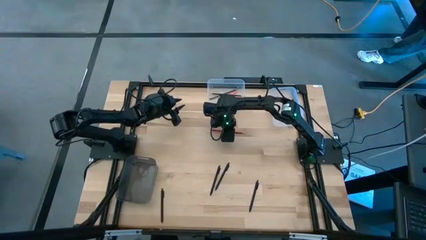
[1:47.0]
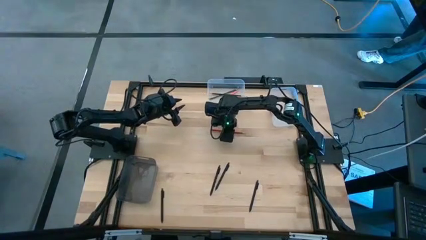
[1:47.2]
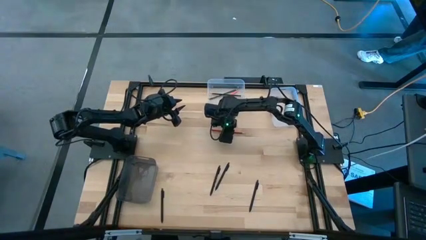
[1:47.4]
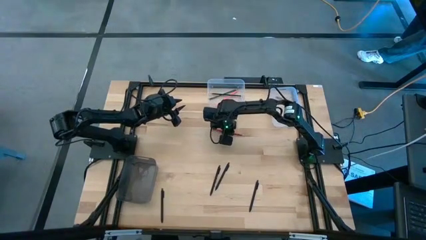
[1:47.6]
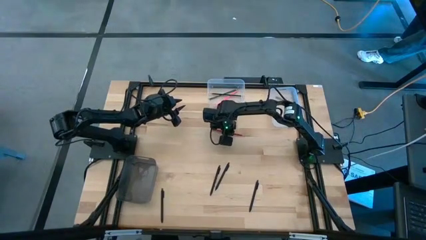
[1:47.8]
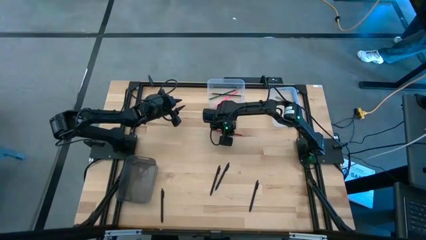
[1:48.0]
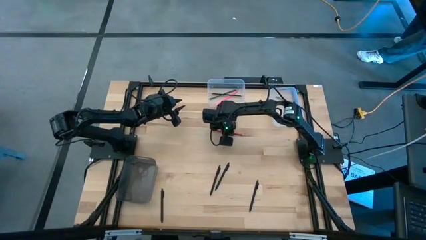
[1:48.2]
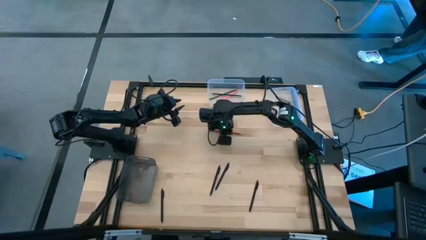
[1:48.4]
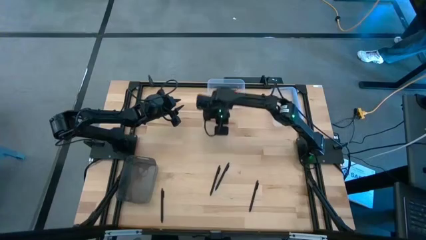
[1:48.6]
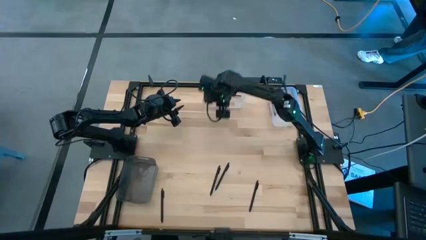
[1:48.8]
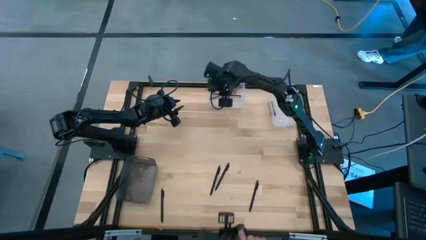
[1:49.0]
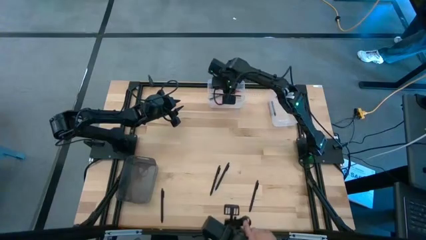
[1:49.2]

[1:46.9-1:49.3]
Task: Sort crayons/erasers/pens/pencils in bins
Put the red pencil into the left transparent bin

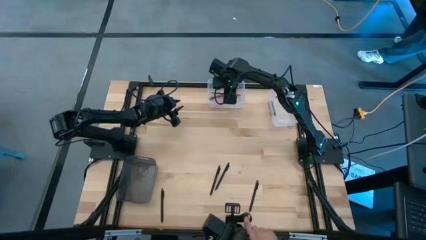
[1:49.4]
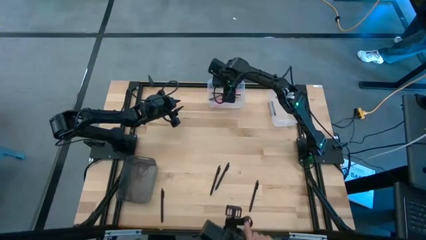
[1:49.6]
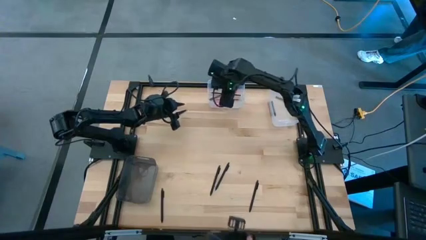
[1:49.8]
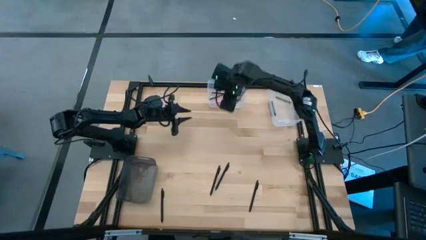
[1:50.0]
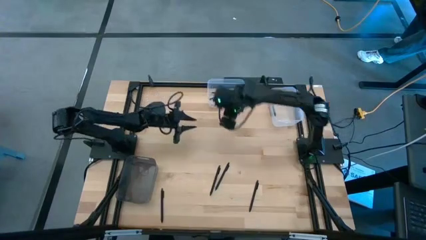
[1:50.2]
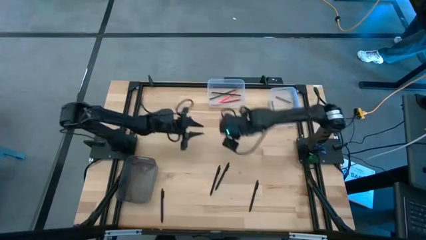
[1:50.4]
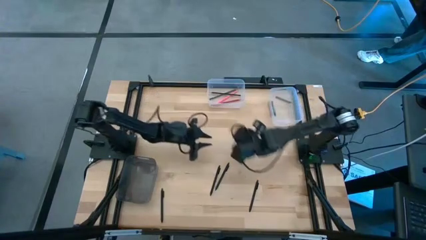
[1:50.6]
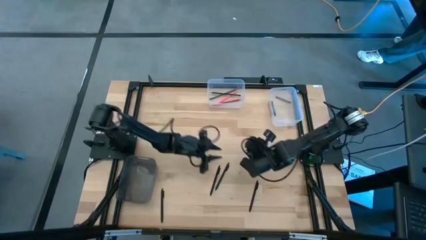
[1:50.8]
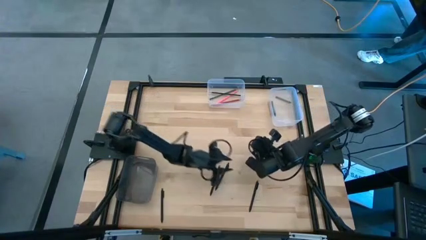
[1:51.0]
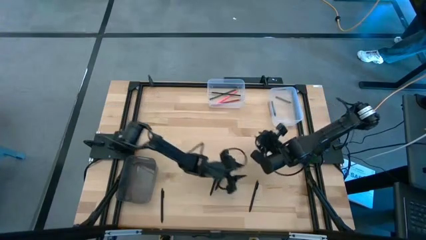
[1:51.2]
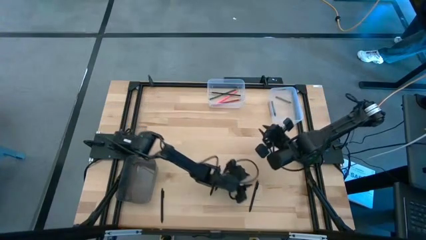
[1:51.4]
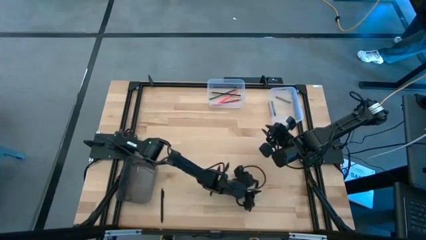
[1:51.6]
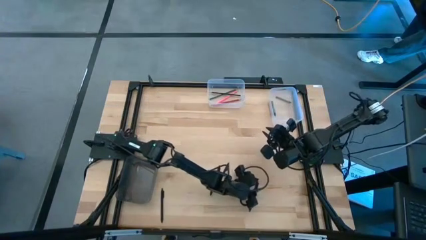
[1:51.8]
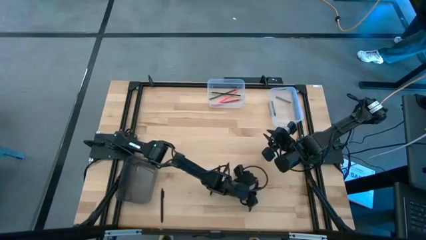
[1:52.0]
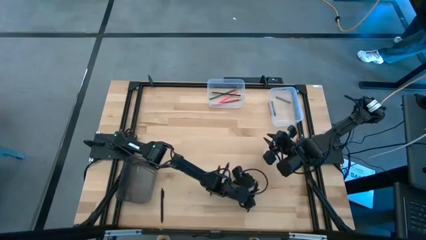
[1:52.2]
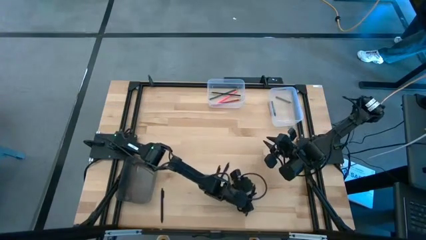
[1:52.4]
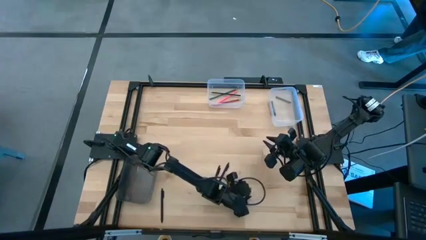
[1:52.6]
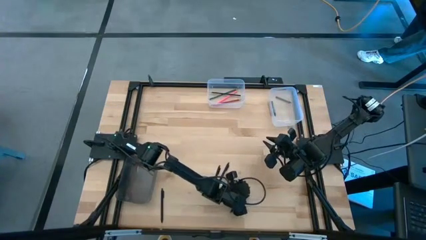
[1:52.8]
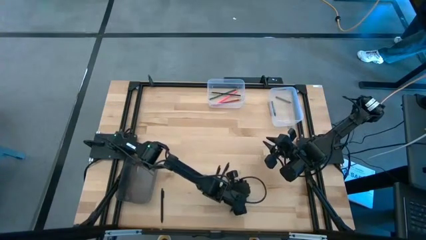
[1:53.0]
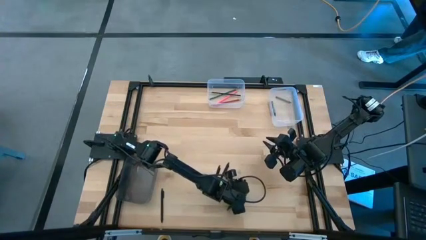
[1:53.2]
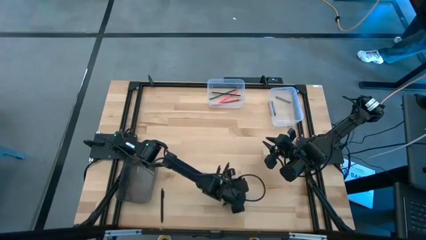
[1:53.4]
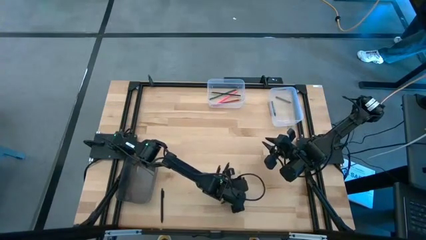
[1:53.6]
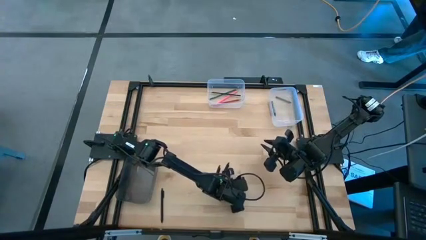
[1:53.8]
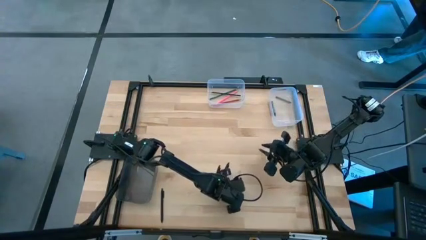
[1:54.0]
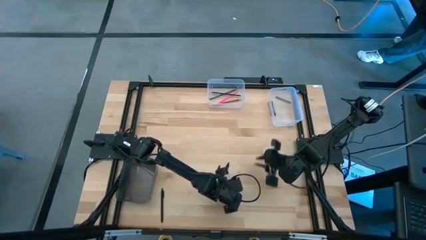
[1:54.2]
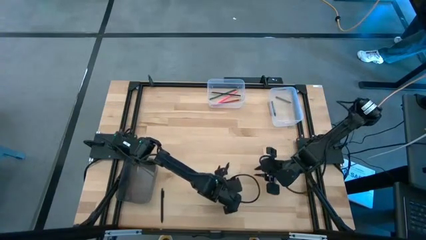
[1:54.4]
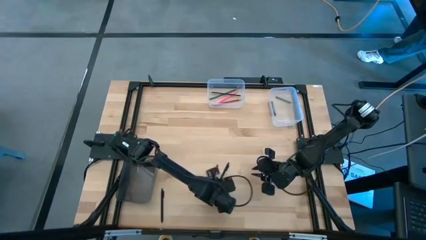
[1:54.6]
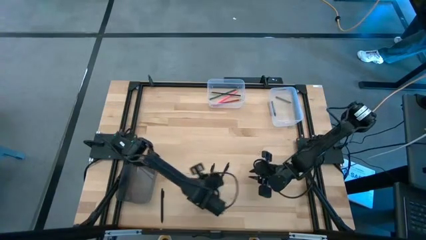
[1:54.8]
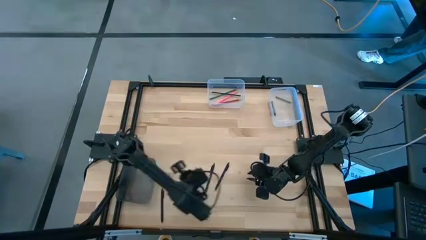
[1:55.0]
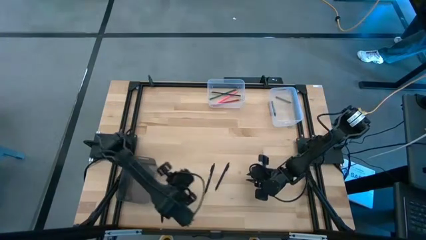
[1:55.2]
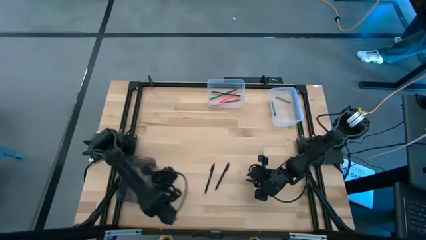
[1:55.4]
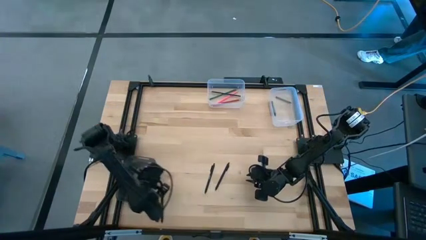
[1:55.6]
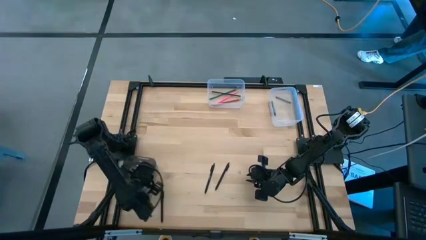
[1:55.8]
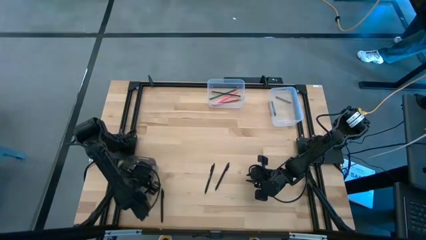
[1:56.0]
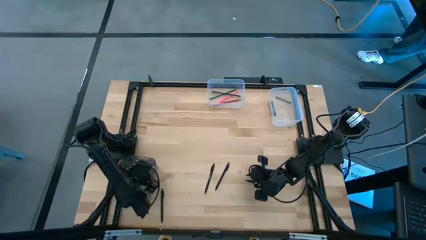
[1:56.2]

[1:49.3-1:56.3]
Put the right black pen into the black bin

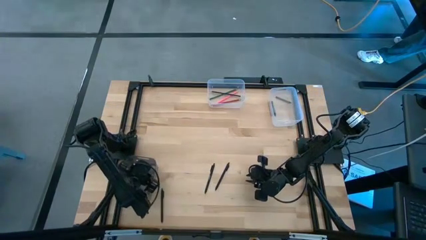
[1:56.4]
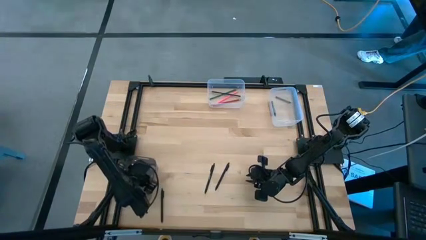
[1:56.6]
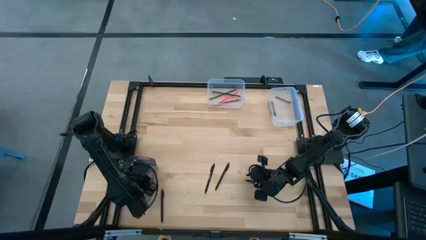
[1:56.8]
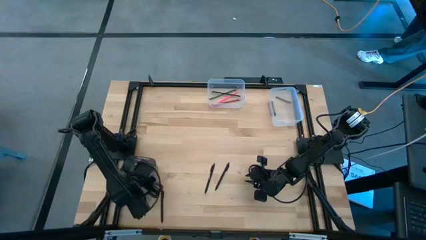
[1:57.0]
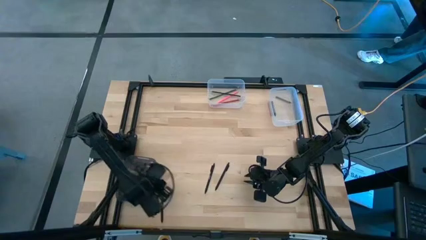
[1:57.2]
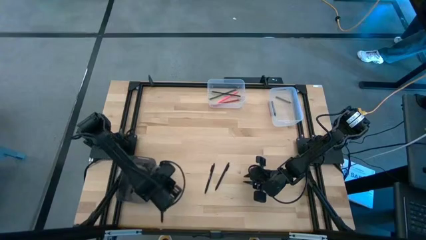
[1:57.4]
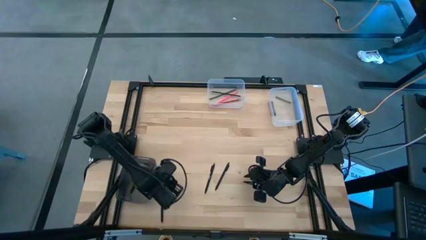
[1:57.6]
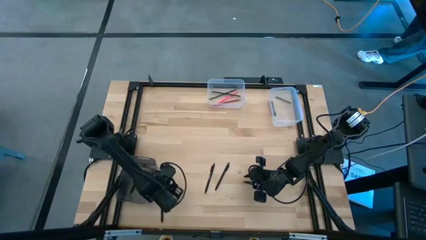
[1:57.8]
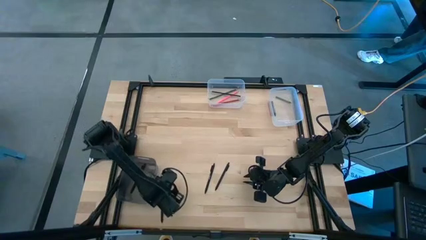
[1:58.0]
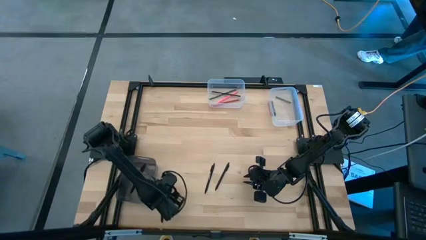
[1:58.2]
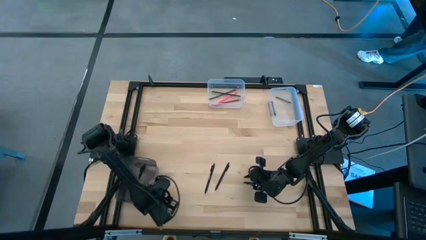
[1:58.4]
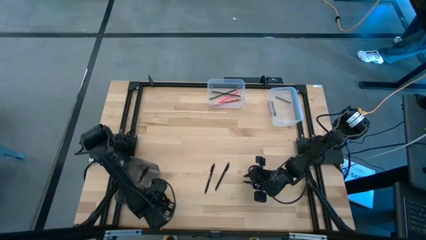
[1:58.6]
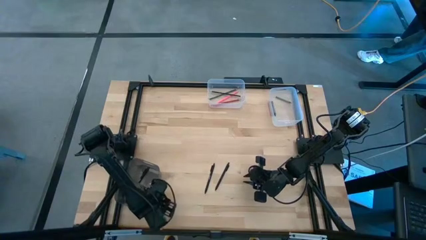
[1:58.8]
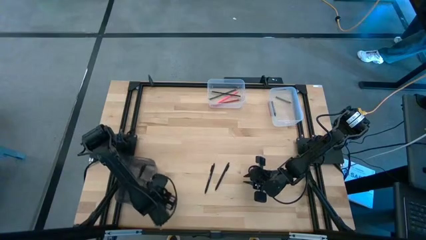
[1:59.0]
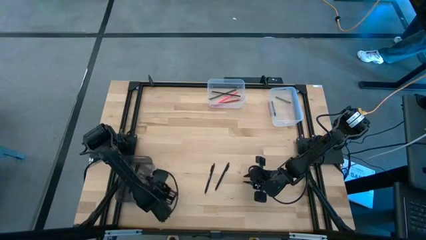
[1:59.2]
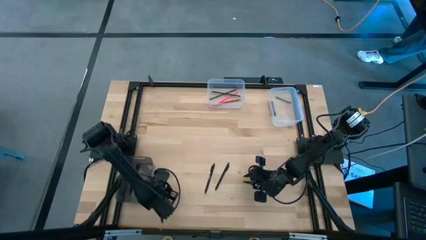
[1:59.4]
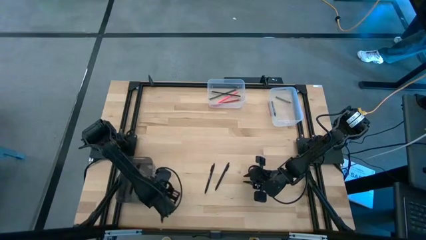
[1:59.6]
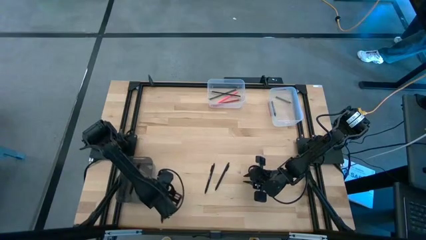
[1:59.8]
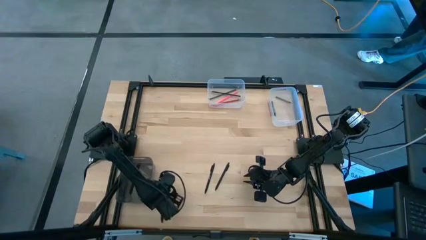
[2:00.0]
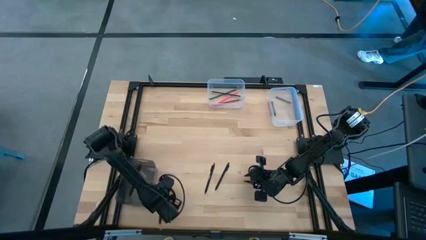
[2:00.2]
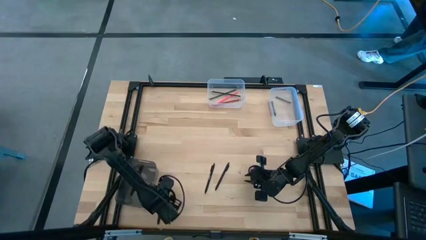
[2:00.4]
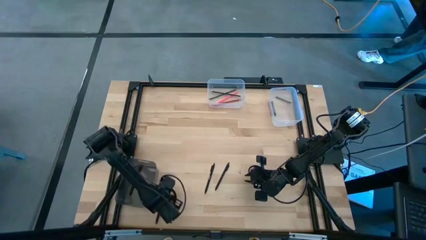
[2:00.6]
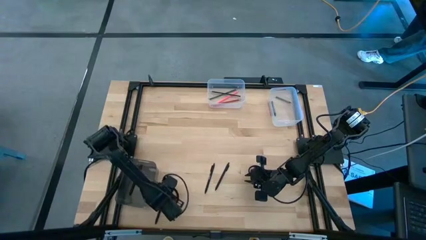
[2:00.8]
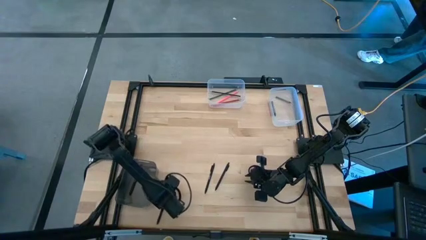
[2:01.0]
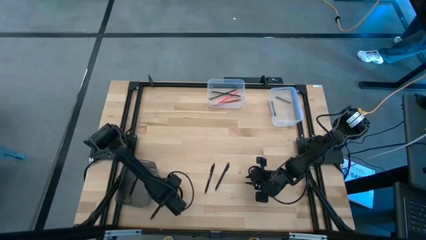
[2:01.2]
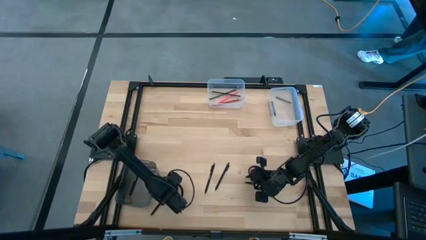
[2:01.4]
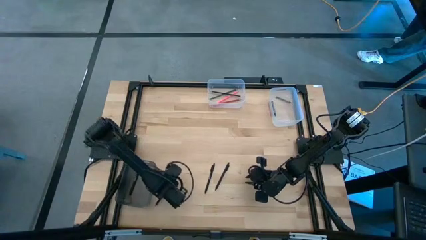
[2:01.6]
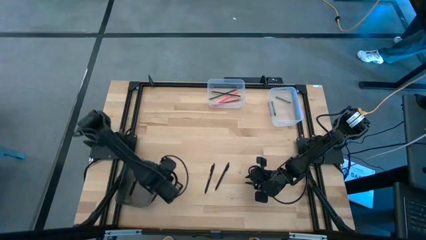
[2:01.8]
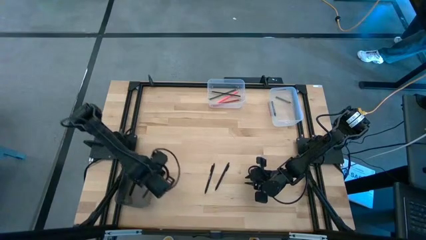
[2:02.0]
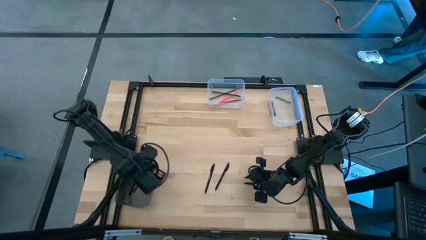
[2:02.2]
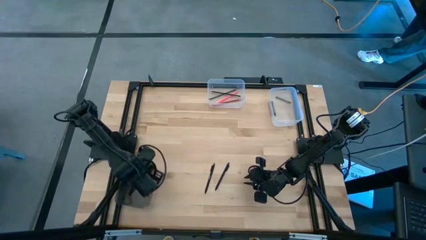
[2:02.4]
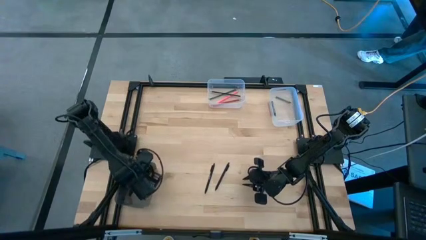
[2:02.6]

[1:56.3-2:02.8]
Put the left black pen into the black bin
